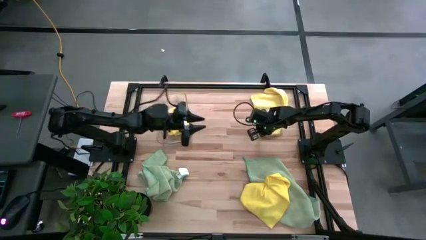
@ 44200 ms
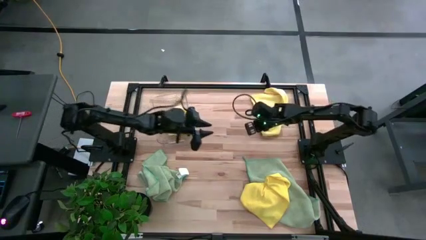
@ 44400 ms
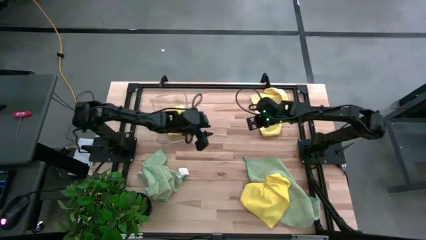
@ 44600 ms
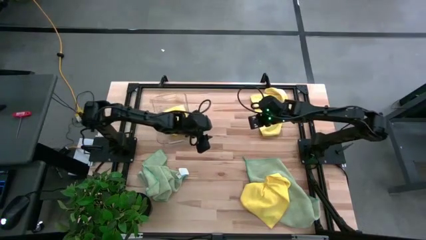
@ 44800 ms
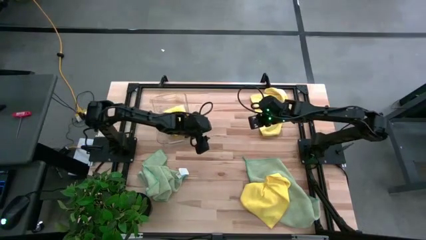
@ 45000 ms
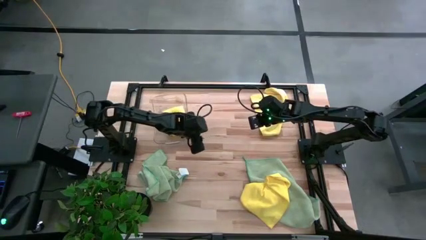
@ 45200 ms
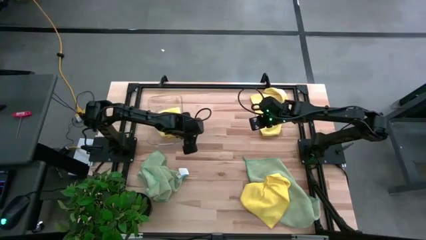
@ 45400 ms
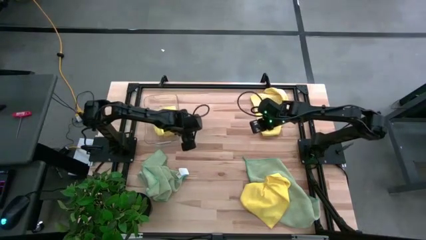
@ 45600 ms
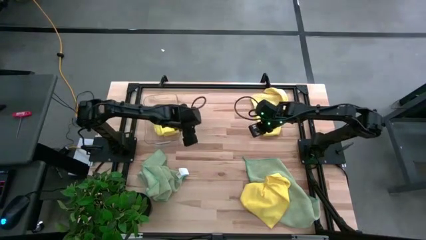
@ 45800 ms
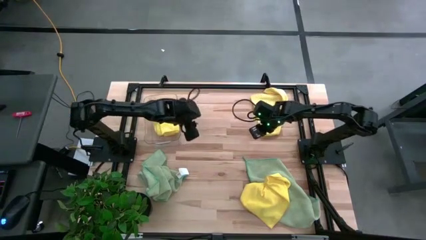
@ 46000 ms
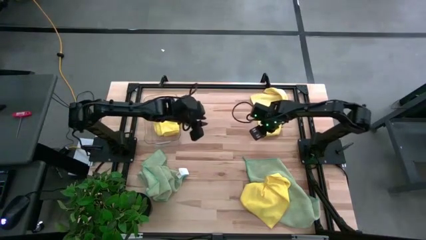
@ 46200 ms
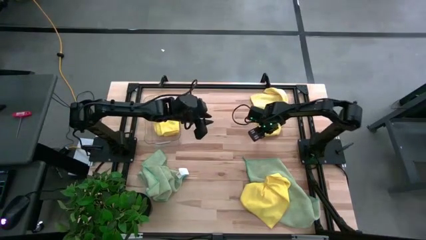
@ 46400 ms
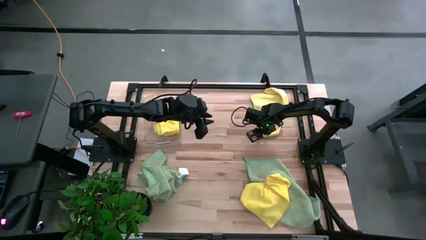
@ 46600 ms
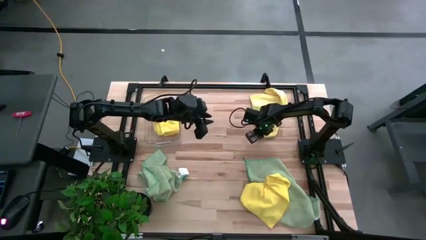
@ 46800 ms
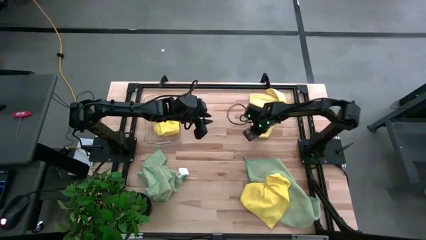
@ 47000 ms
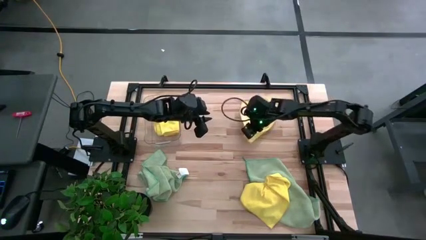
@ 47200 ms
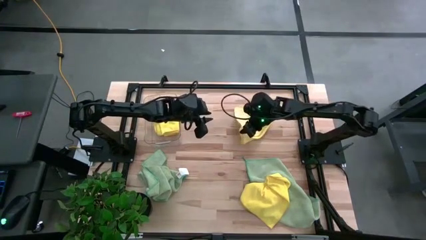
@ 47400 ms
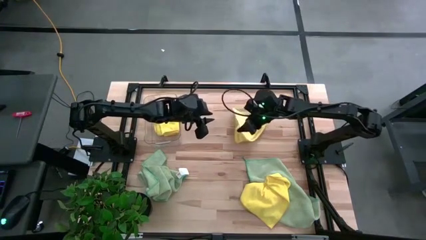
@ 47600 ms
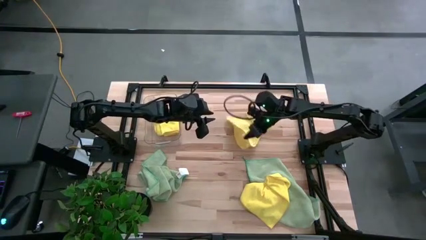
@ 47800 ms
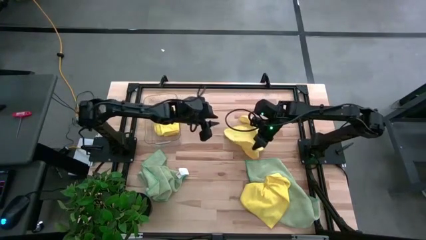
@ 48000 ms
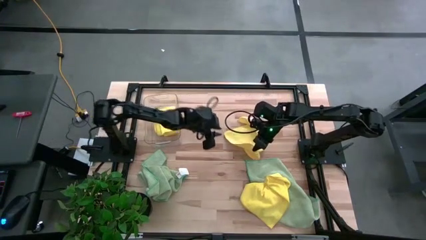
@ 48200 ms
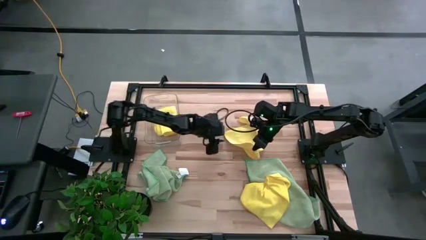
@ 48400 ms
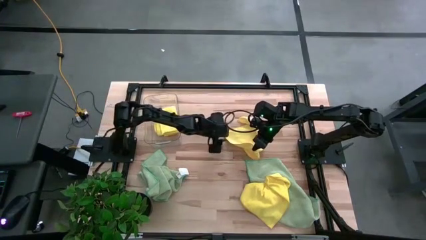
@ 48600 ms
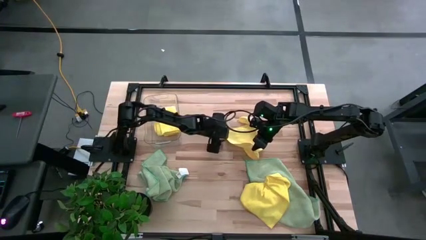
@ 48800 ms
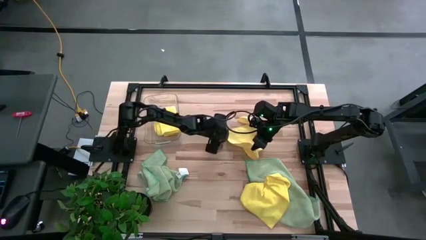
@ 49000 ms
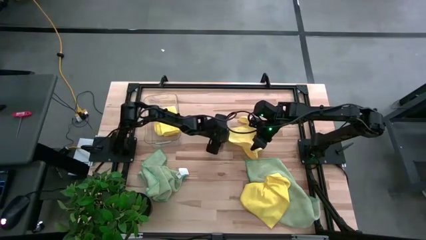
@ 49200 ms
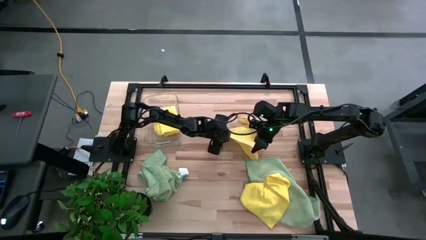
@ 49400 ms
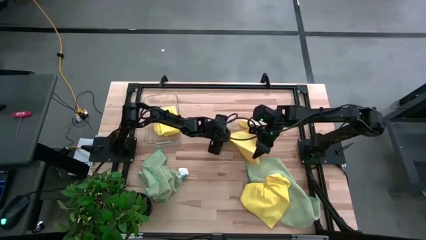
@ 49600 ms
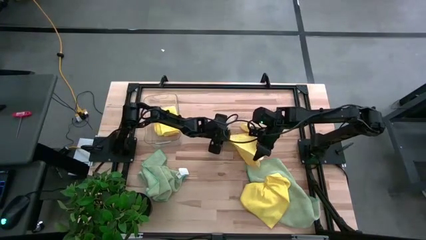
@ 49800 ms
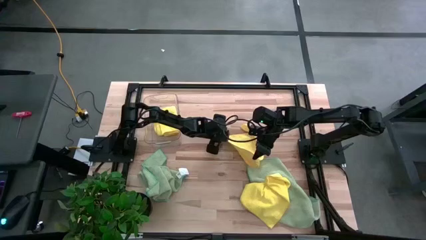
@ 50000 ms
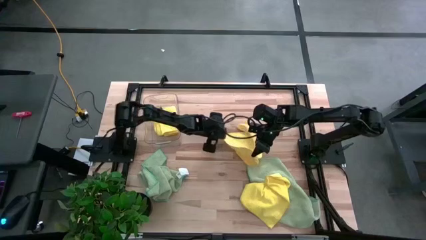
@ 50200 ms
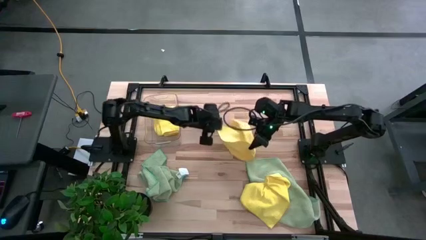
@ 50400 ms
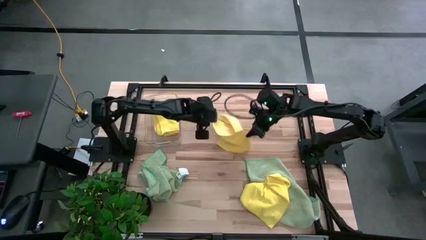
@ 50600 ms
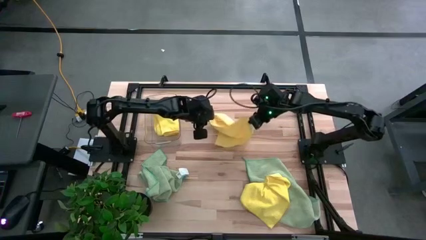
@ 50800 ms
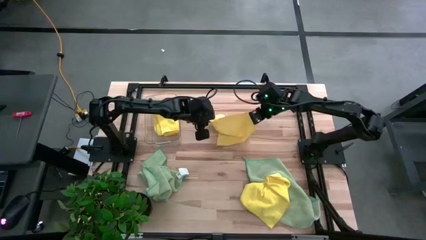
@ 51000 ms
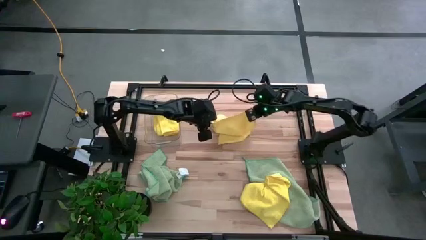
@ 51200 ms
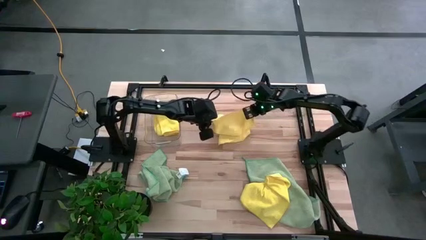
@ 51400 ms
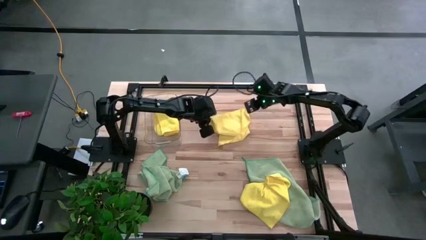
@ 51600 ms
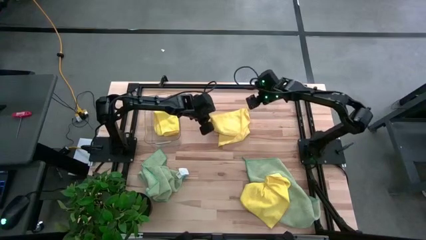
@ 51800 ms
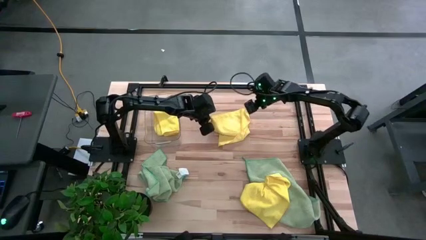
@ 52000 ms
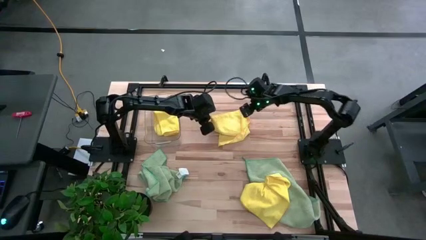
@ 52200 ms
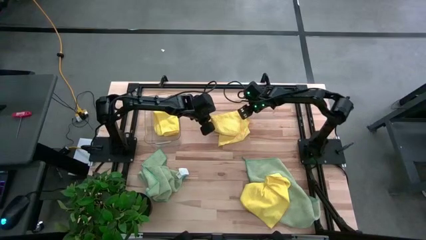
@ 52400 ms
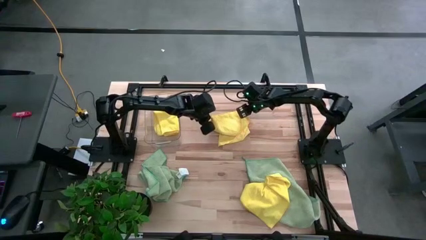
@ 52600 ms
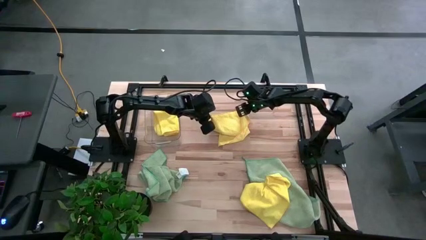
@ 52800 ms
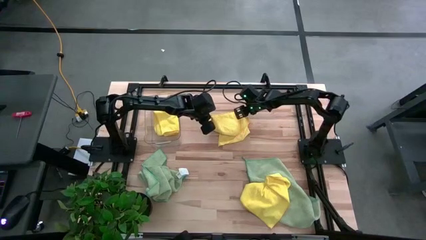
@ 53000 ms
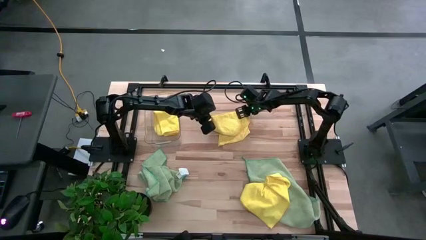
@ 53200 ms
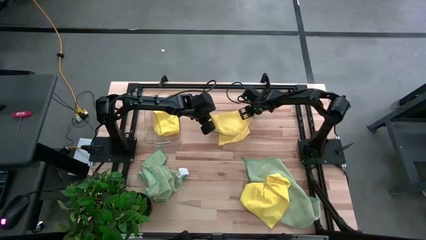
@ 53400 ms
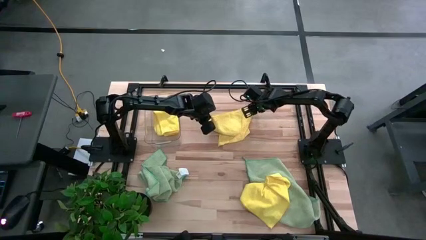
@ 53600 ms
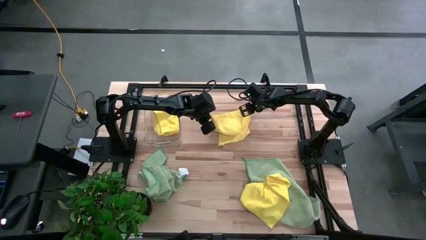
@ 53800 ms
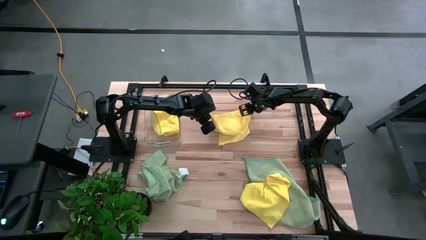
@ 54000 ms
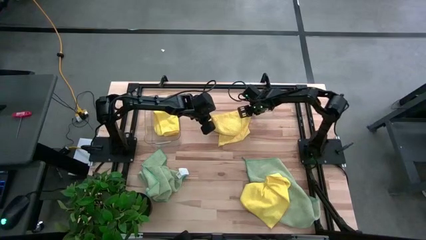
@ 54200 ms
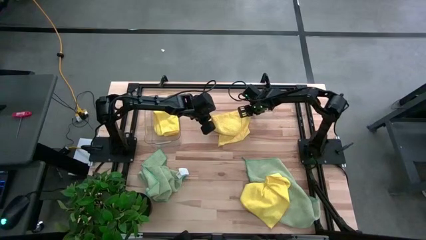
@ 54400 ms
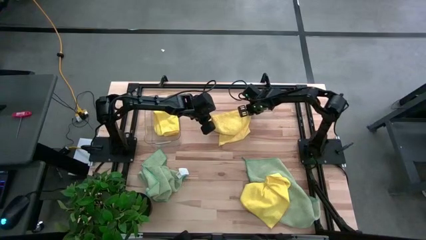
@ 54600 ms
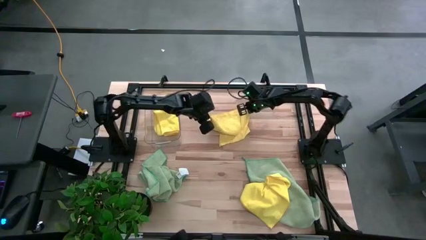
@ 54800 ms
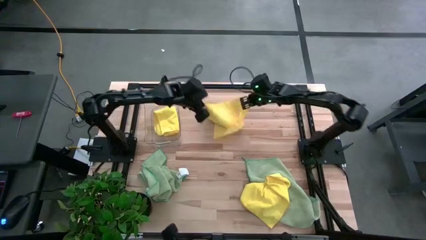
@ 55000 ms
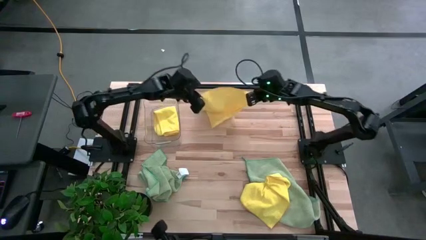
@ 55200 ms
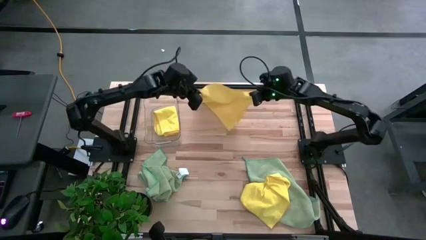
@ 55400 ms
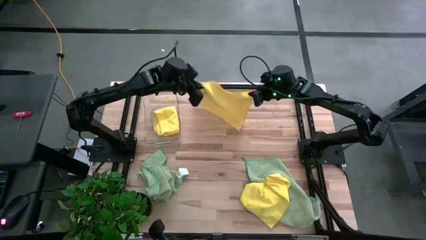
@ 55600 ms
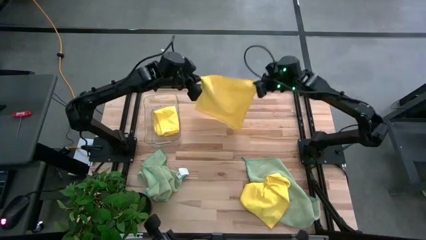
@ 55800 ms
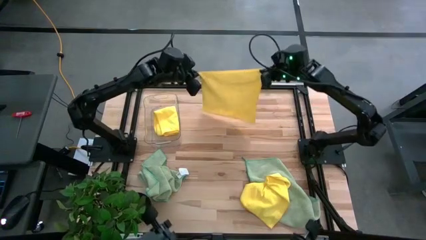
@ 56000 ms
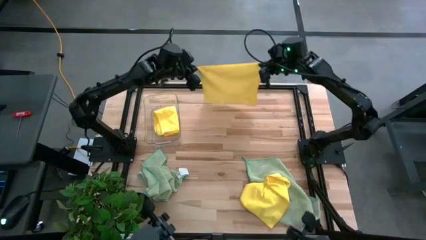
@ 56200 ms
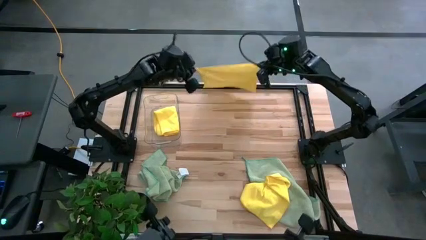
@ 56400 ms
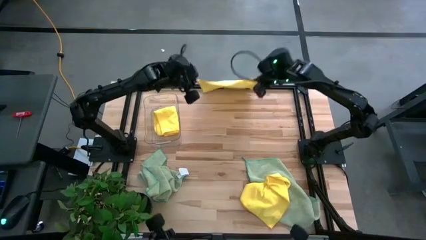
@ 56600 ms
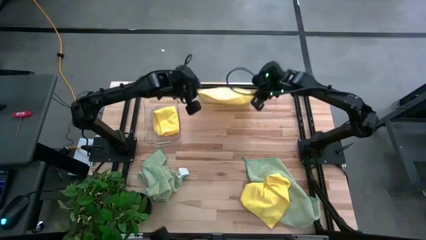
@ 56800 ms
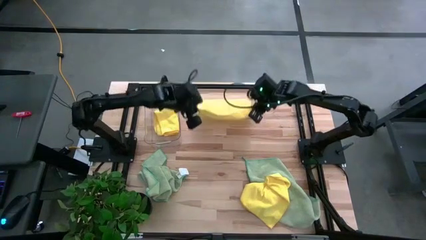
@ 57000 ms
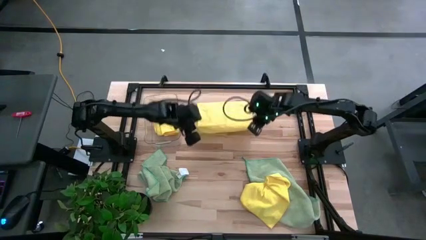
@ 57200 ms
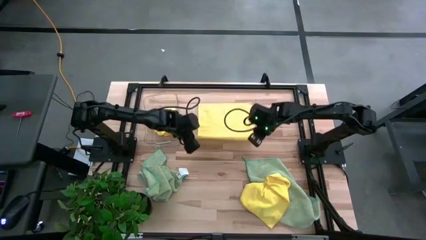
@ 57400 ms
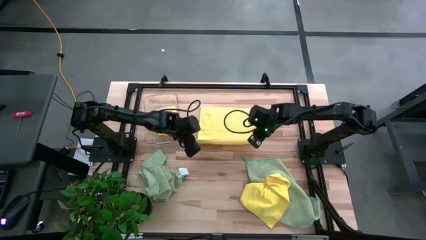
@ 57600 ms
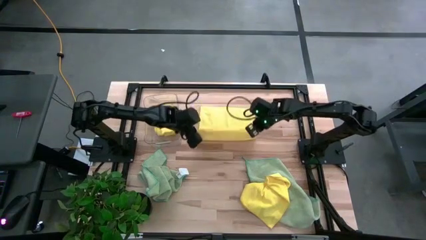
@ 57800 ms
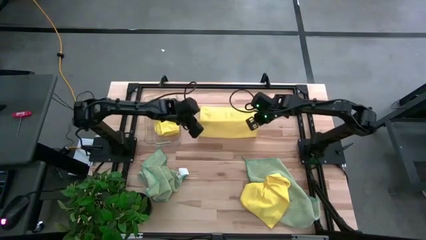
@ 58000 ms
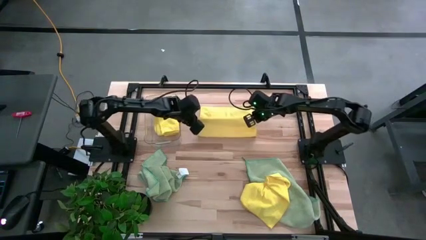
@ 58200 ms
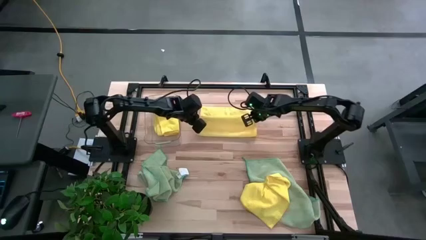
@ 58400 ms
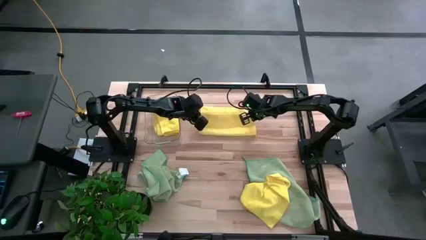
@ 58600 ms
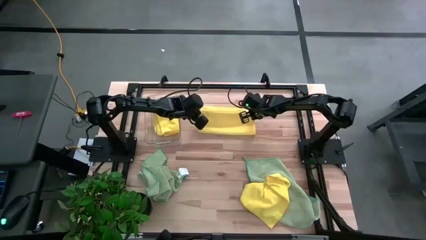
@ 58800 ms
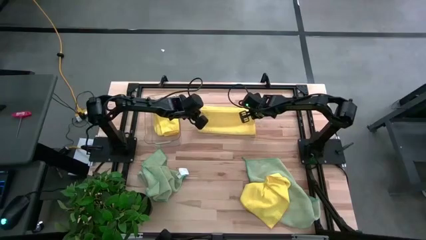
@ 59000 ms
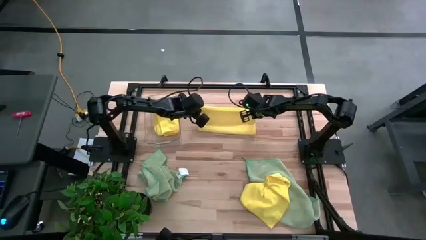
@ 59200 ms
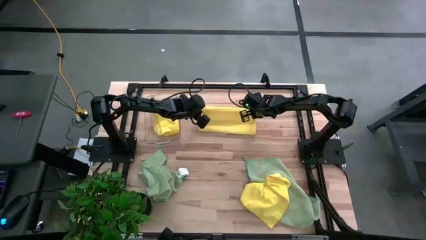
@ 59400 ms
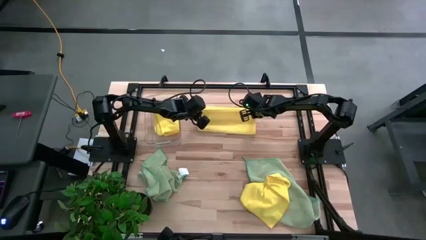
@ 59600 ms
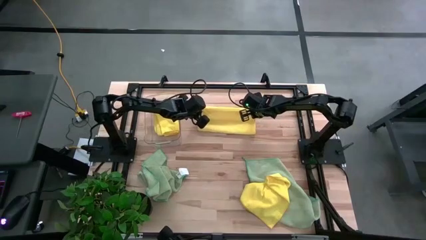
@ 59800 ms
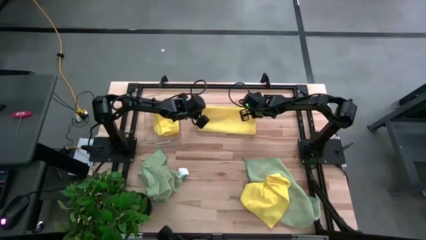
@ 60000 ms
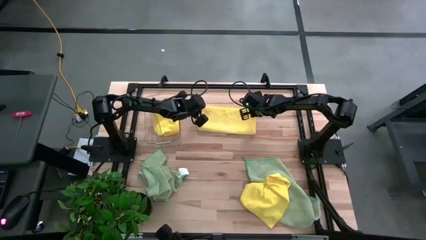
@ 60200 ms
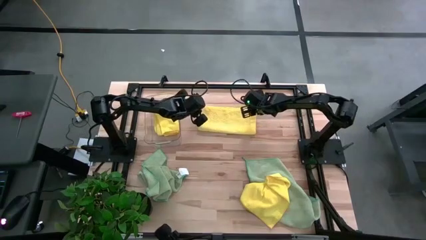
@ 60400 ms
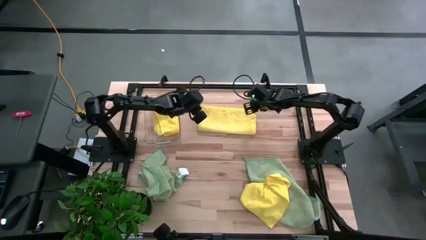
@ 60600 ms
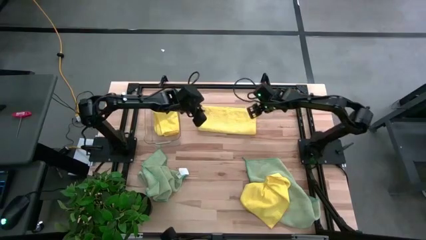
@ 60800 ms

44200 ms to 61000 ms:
Task: Fold microfiber towels
Fold the top yellow towel
